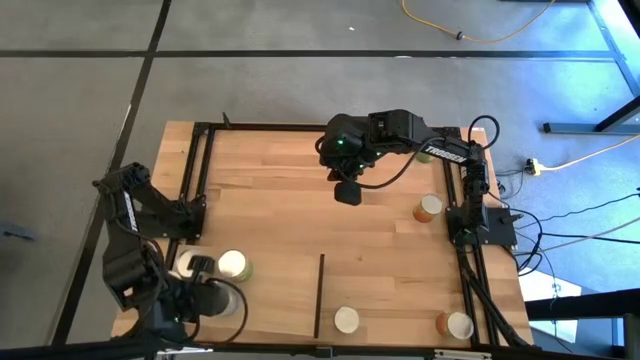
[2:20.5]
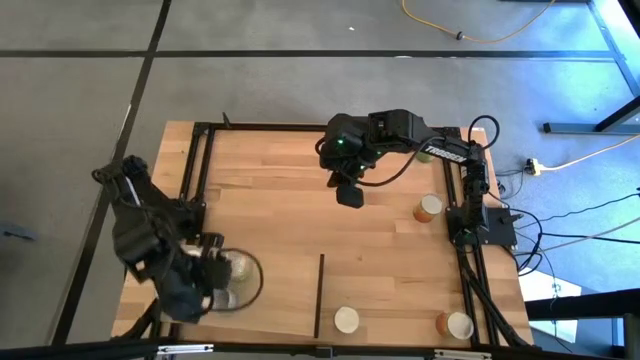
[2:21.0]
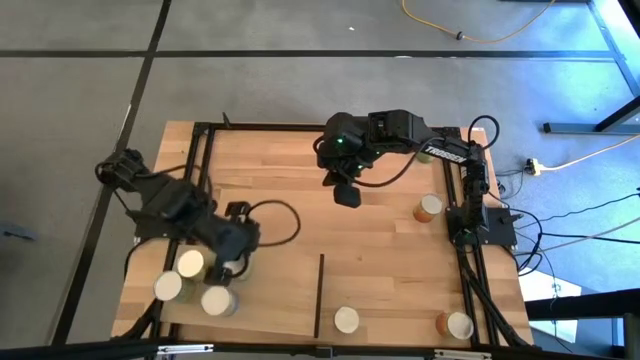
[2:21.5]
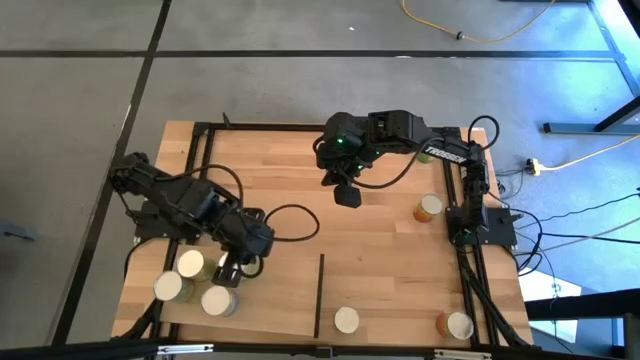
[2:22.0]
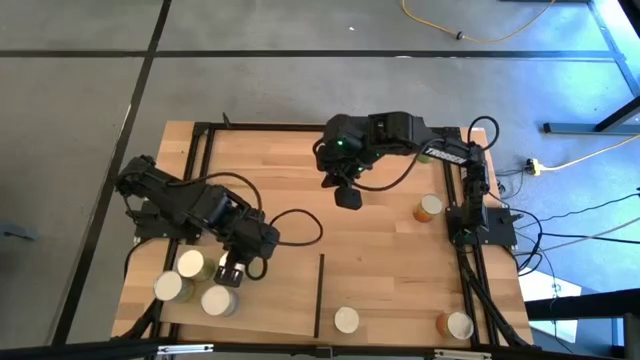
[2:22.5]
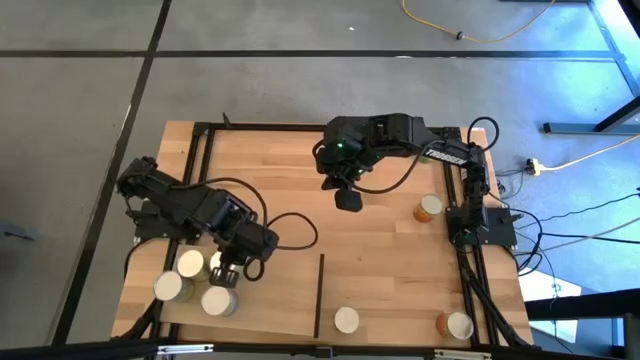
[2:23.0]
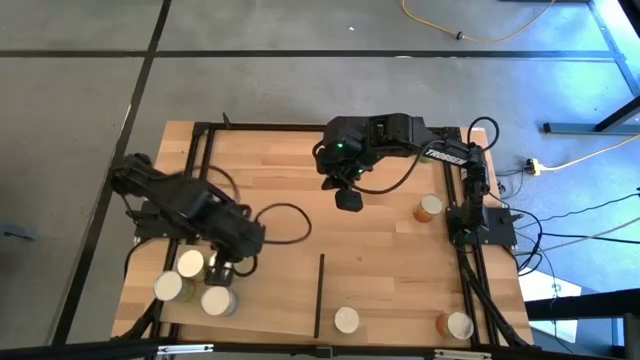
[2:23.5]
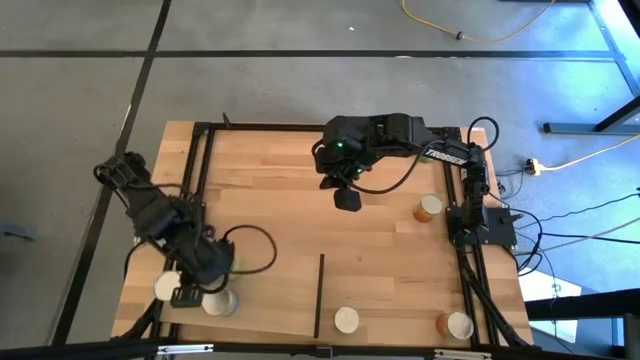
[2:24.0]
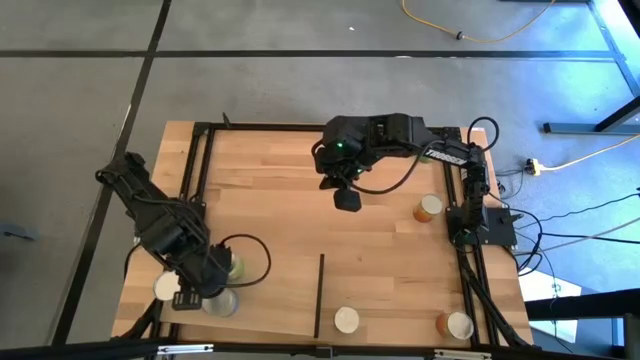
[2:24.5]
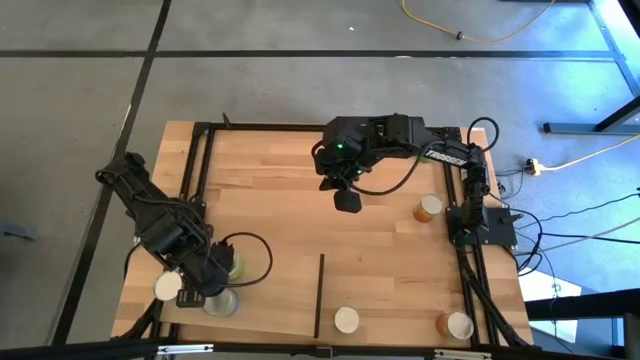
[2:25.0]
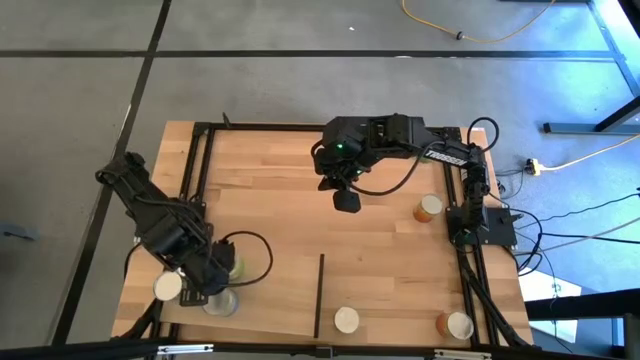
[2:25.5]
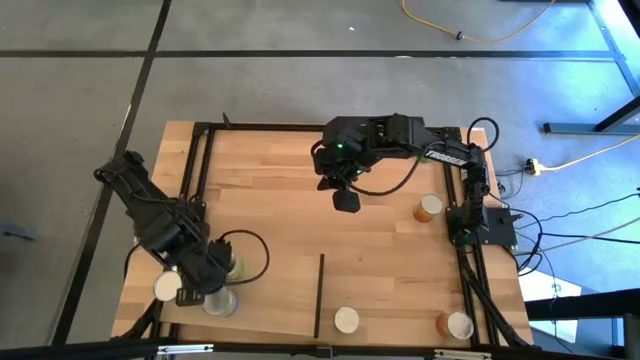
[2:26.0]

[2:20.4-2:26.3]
Task: Pick and place cans onto a shelf
Adjust the canned goods on the shelf

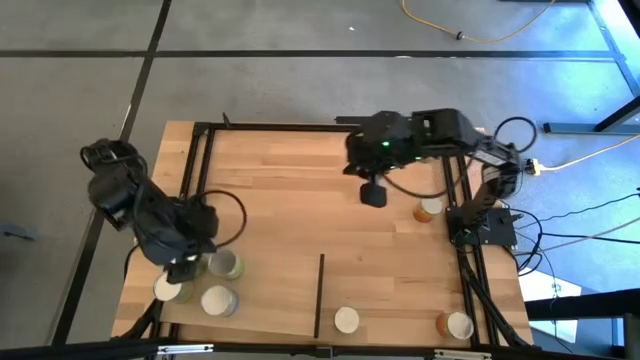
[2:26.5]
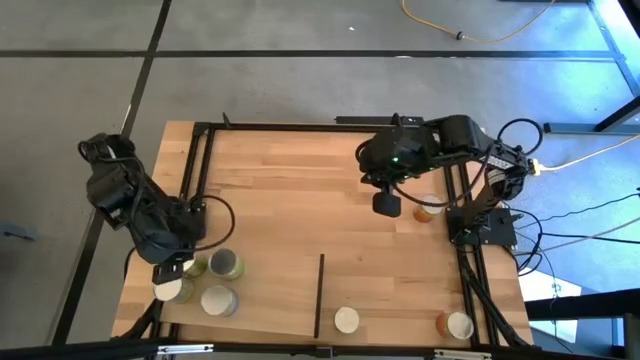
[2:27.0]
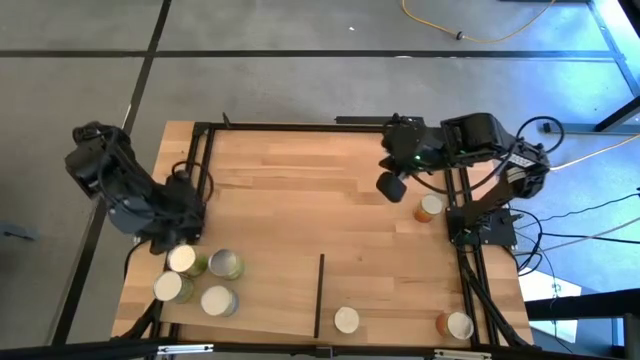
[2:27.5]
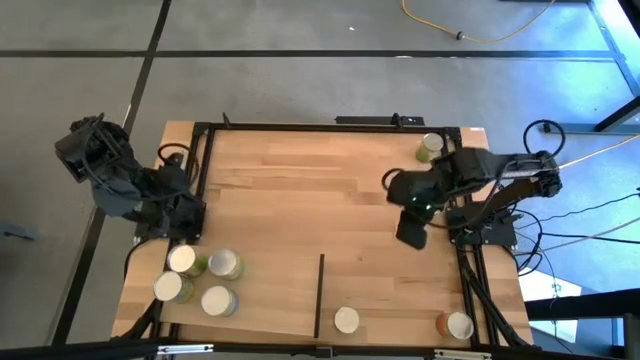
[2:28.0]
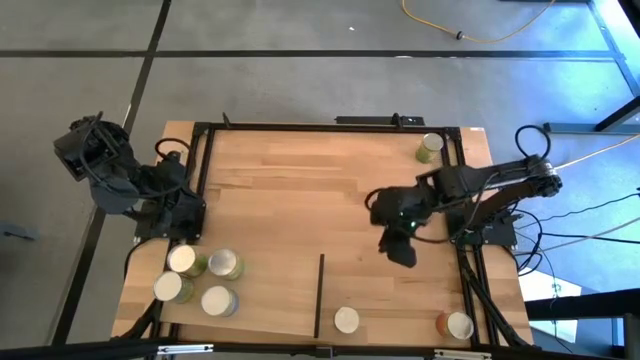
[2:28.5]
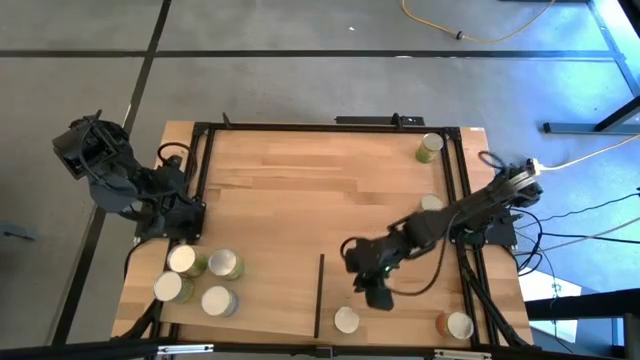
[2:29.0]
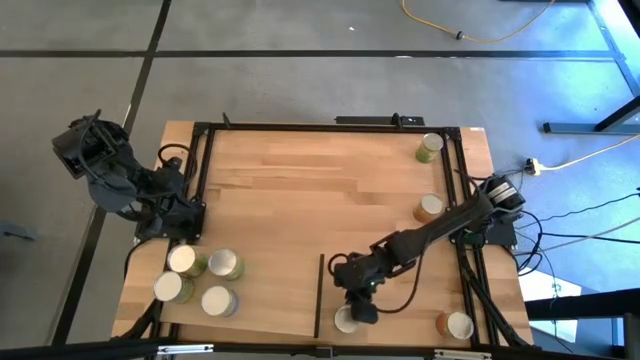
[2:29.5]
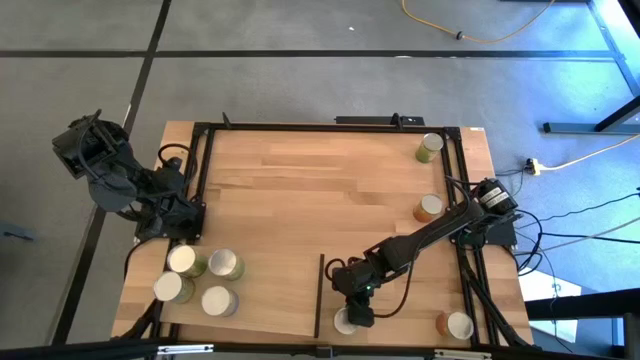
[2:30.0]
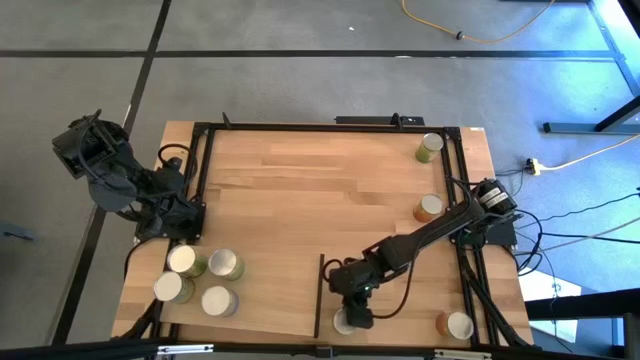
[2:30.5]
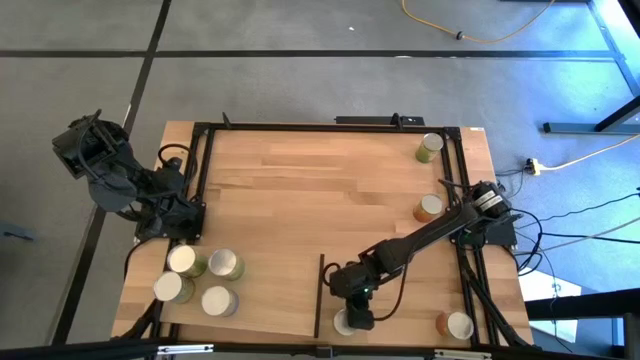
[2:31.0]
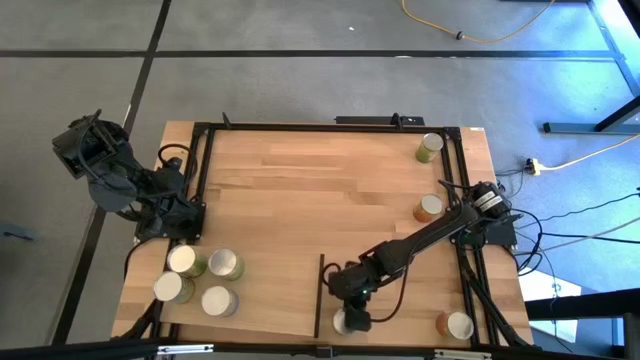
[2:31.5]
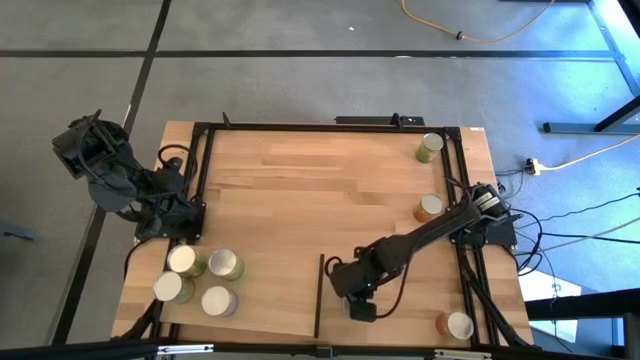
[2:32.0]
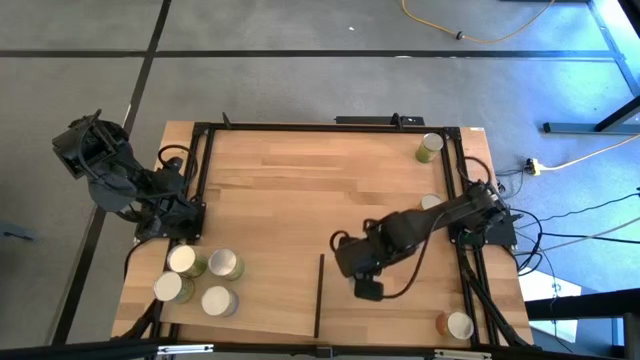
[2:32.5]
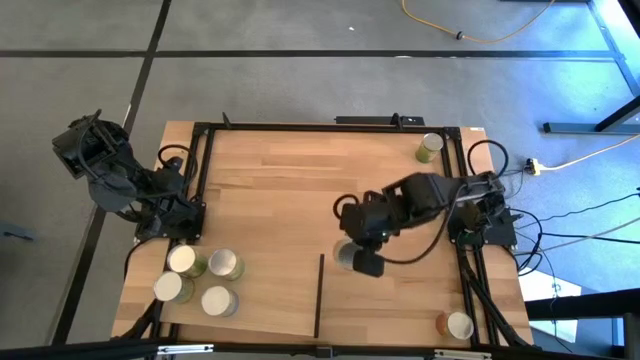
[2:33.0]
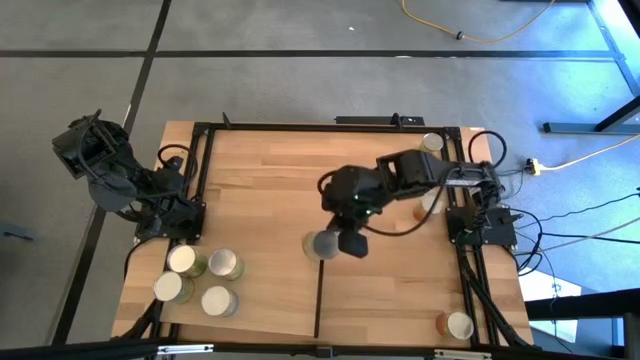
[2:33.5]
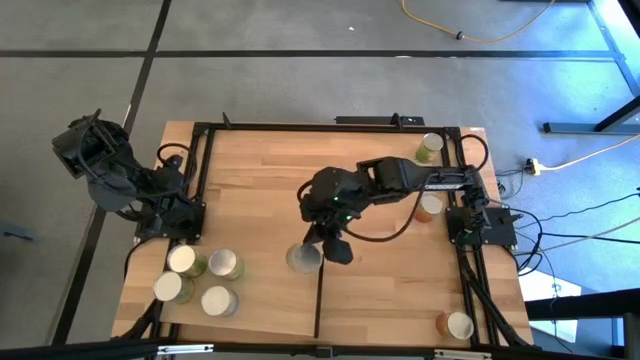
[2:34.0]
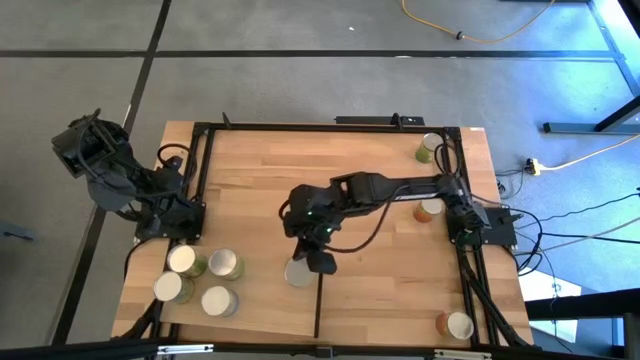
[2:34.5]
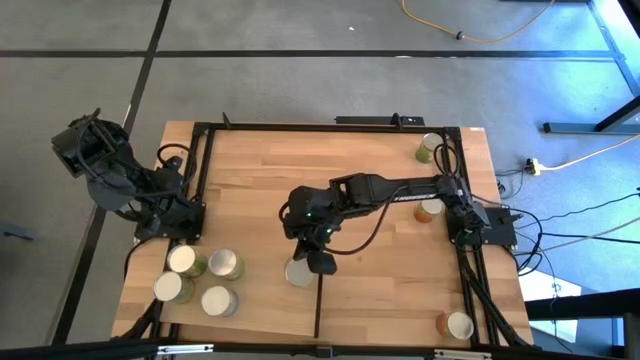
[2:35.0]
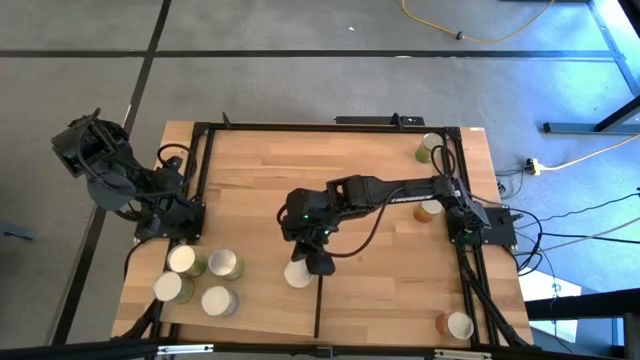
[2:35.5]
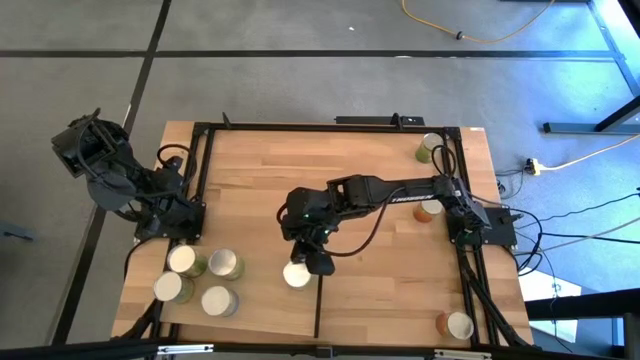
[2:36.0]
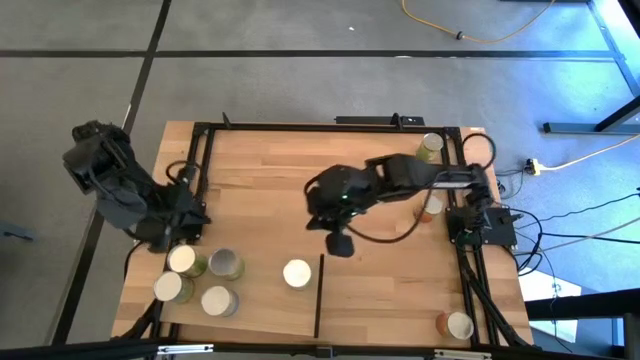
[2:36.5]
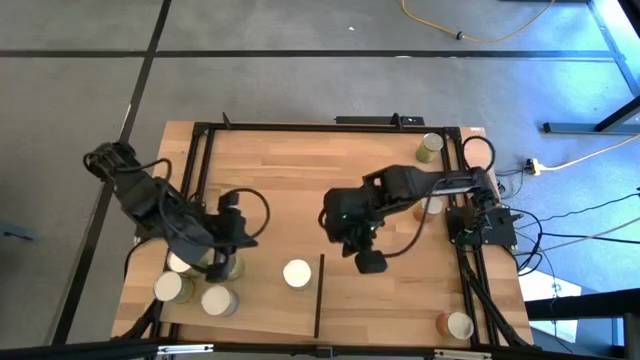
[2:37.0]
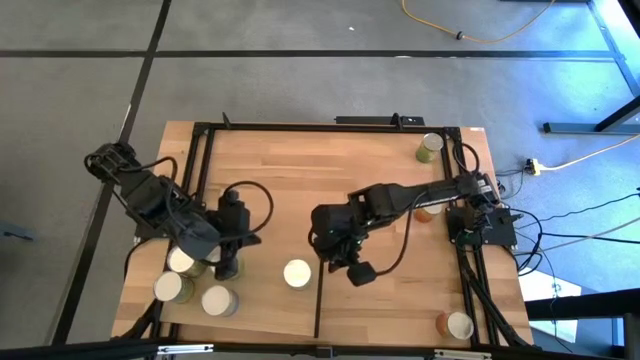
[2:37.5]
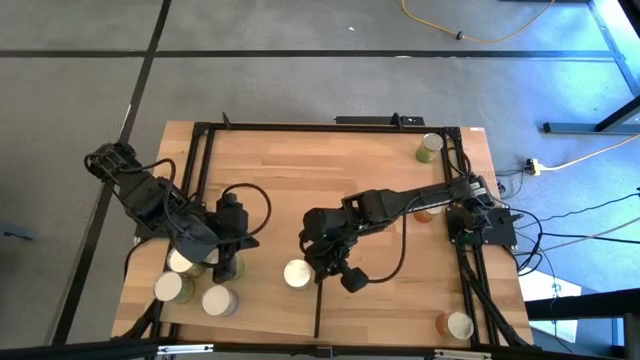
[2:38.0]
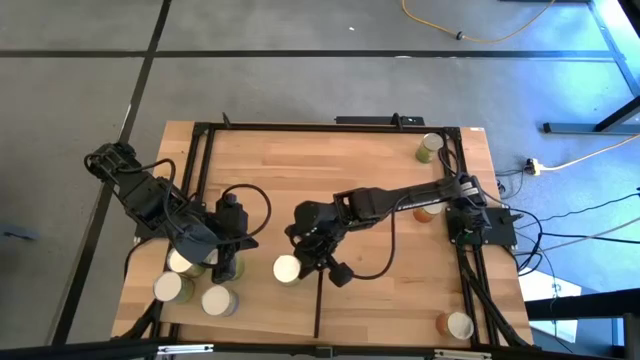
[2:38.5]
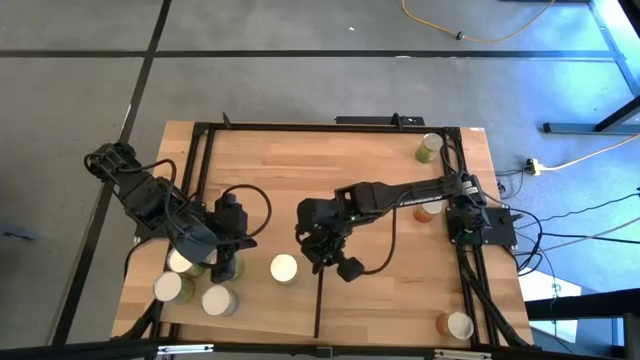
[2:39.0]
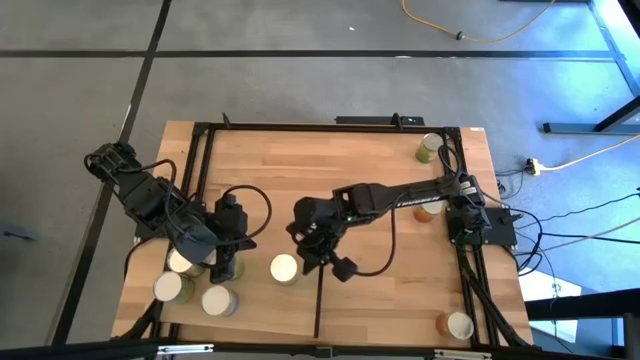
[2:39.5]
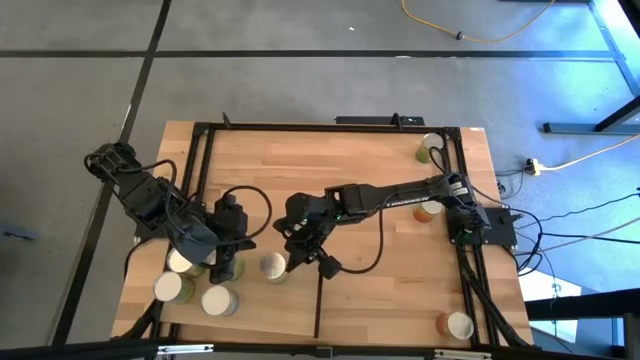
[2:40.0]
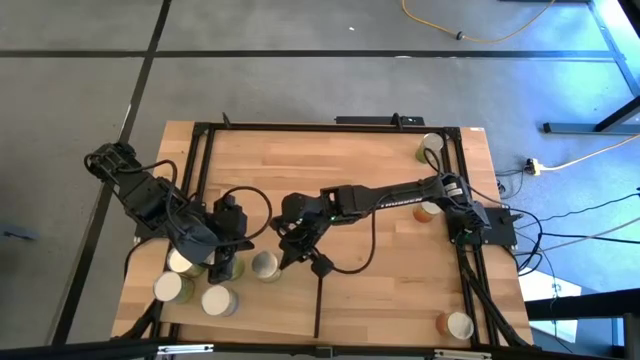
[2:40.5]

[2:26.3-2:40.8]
Put the canned pears on the shelf

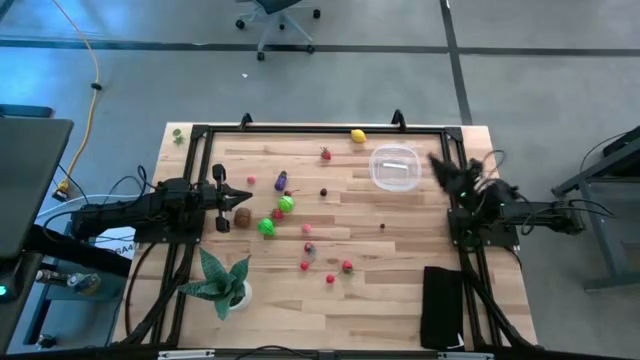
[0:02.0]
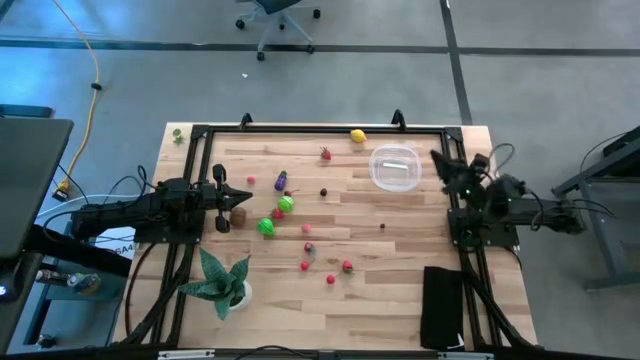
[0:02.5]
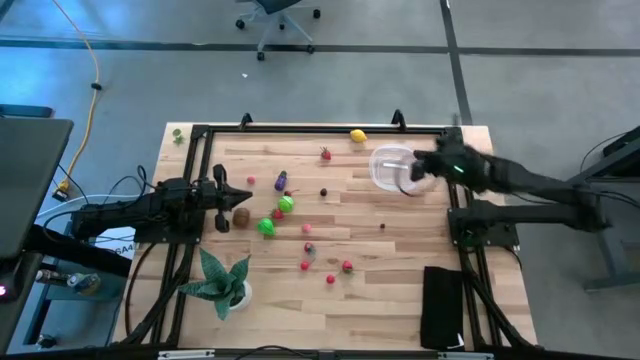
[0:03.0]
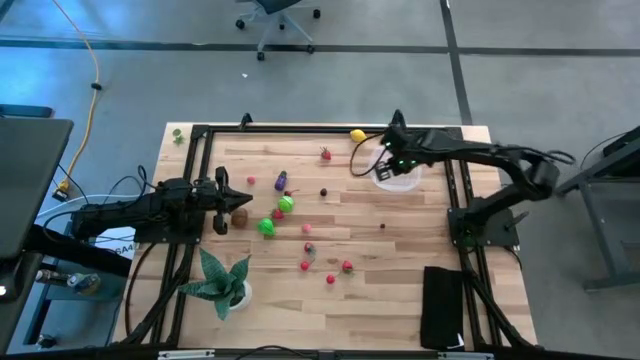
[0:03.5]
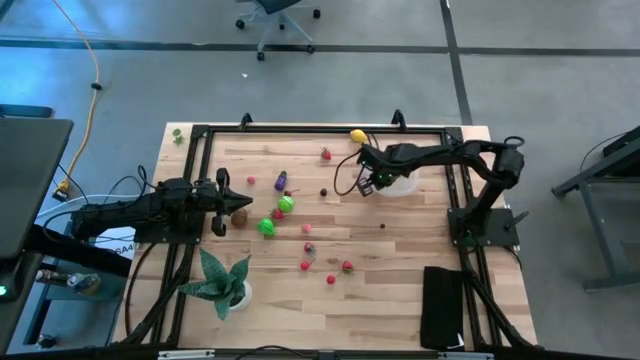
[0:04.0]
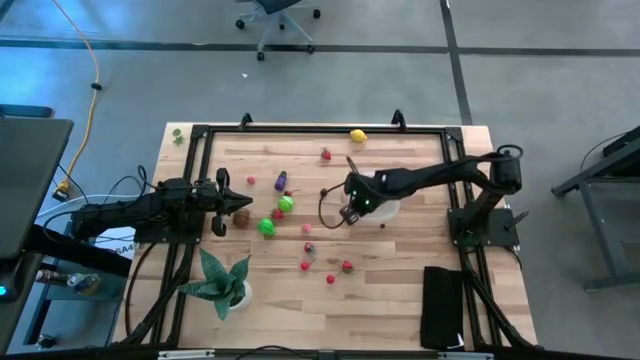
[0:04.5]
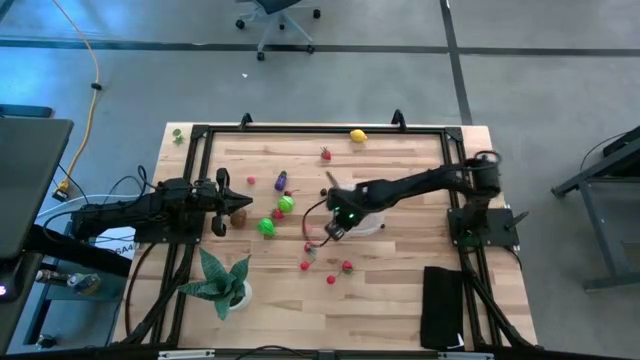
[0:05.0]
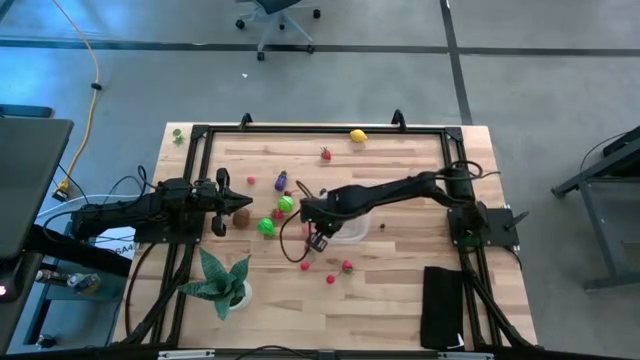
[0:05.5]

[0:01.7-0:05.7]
Task: Pick and placing Produce into tupperware
Prepare the transparent container
